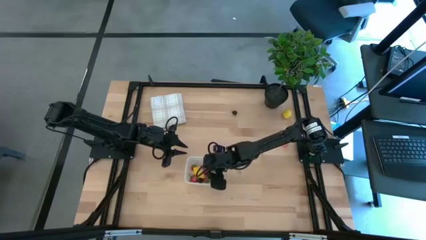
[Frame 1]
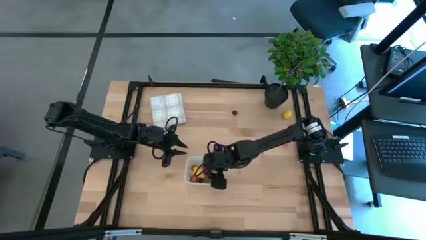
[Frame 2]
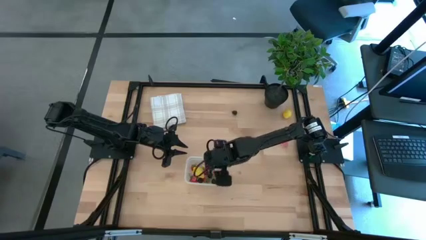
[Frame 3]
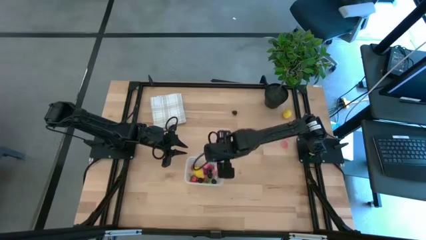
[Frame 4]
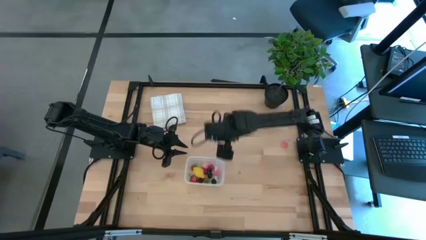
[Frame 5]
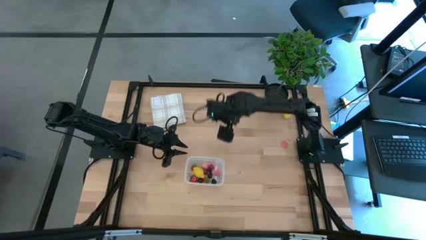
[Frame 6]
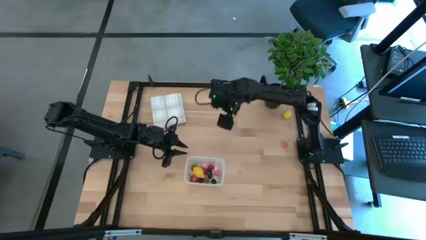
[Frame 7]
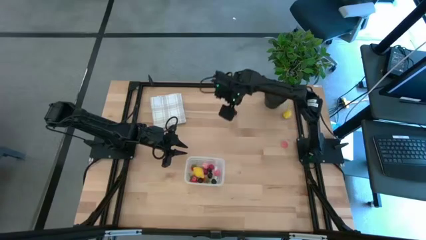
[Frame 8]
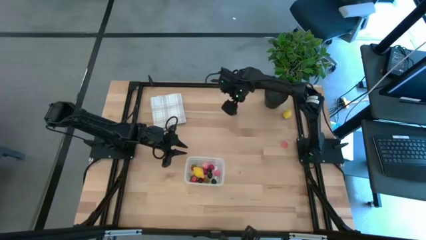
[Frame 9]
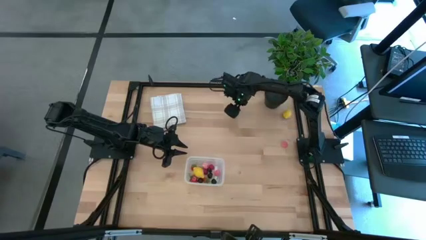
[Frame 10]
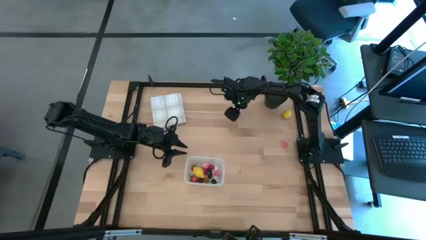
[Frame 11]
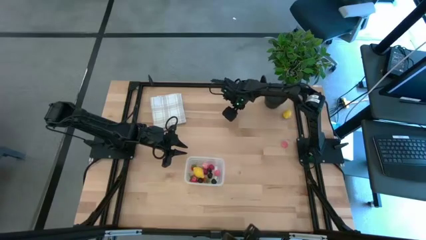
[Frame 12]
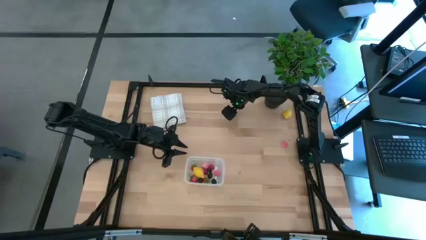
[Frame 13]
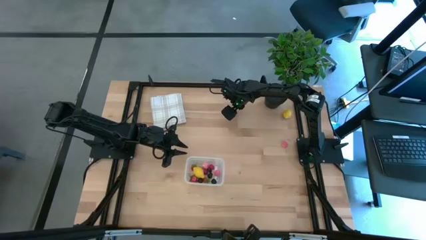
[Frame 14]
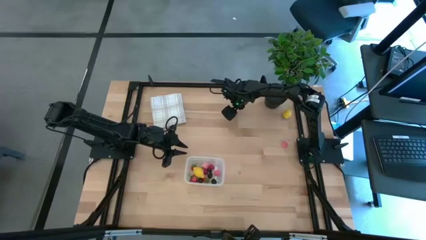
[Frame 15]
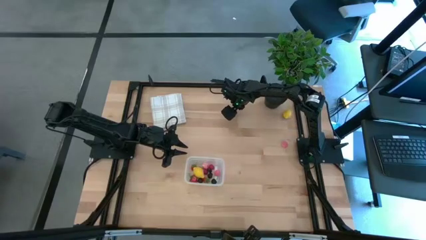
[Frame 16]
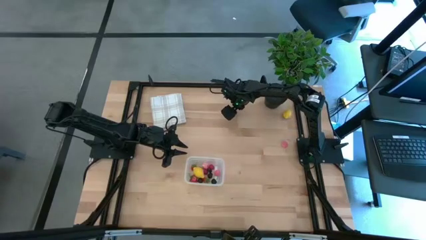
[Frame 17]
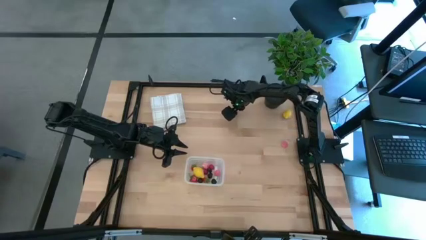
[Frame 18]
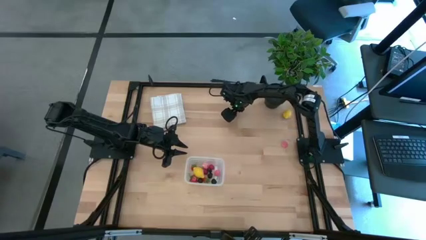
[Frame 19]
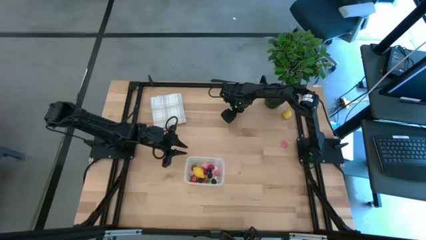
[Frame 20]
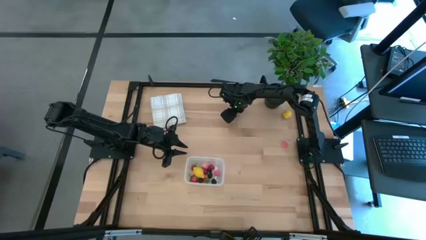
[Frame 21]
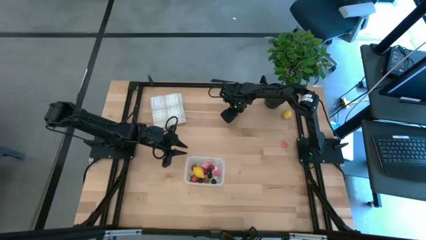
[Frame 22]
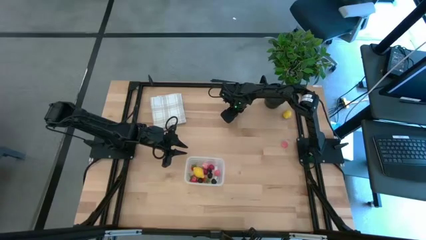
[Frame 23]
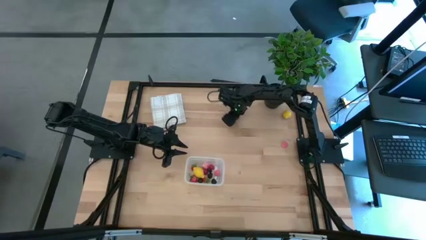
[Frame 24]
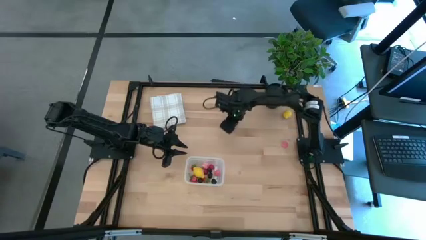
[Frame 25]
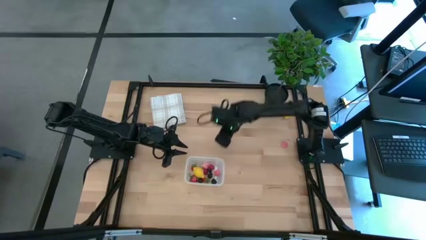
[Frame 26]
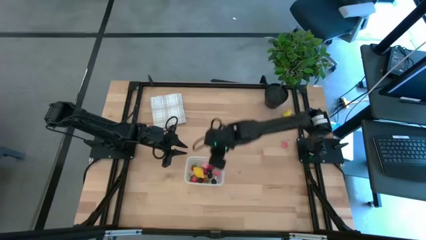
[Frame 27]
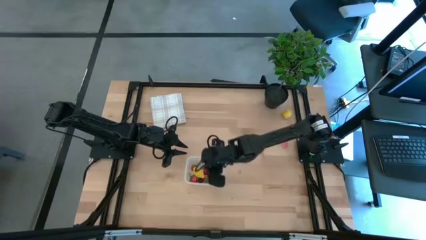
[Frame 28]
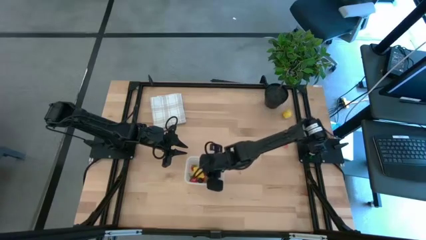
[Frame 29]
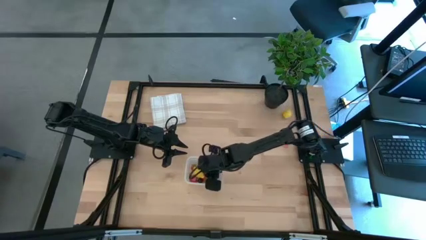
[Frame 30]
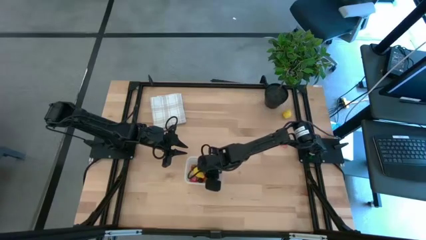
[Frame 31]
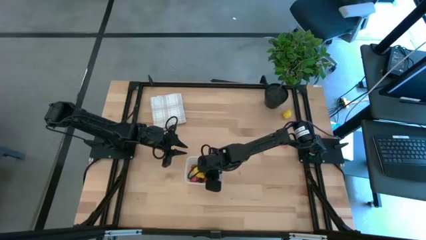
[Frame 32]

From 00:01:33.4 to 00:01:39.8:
Task: Pick and placing Produce into tupperware
Put the blackberry into the transparent bin

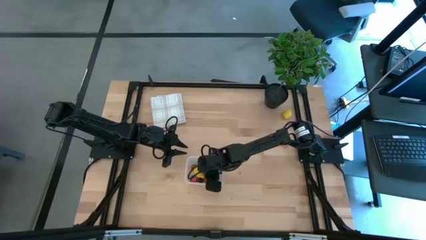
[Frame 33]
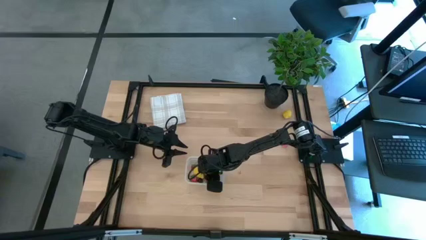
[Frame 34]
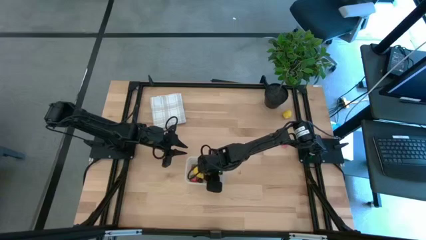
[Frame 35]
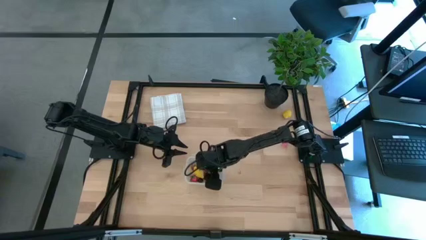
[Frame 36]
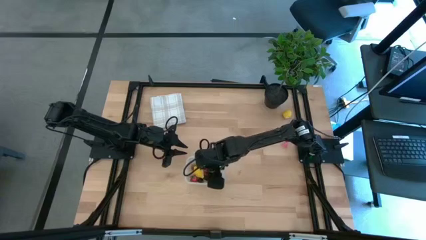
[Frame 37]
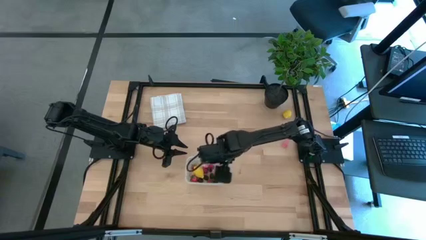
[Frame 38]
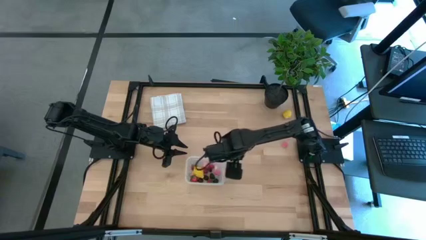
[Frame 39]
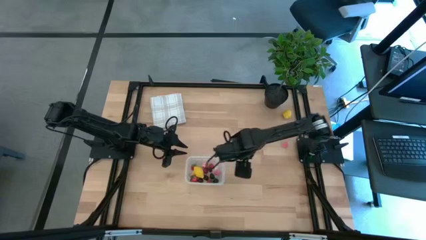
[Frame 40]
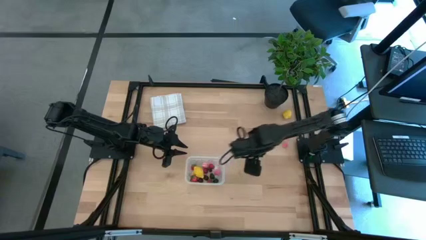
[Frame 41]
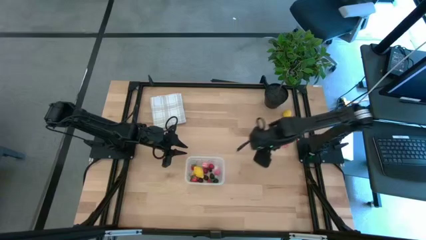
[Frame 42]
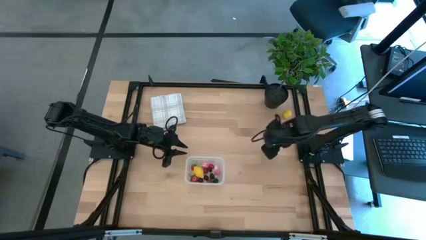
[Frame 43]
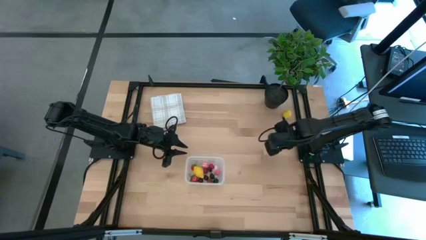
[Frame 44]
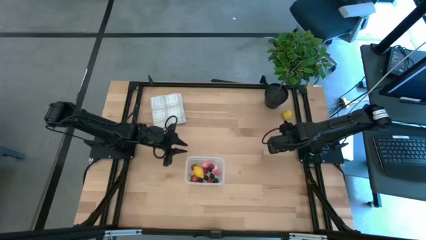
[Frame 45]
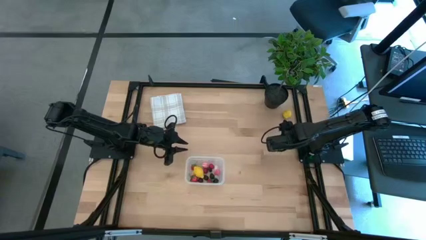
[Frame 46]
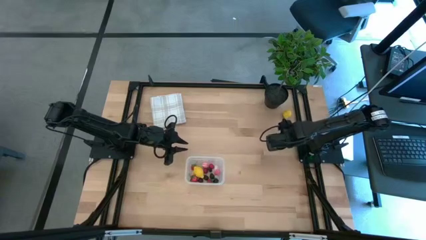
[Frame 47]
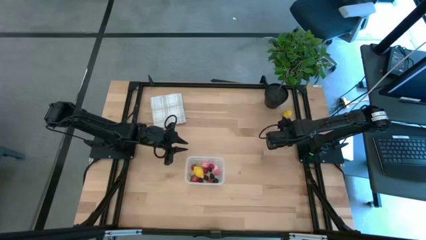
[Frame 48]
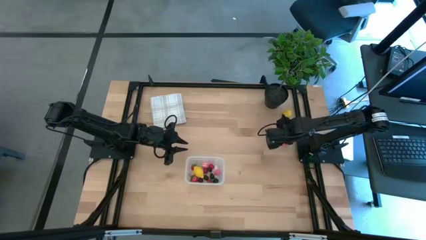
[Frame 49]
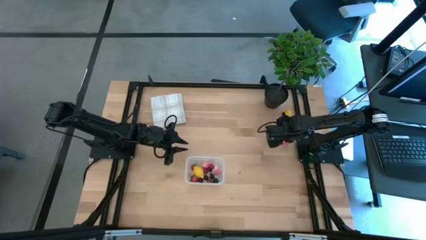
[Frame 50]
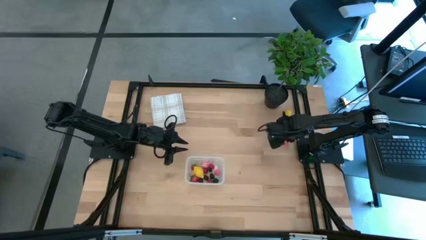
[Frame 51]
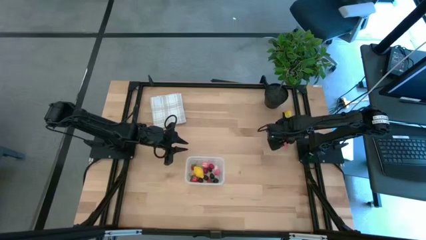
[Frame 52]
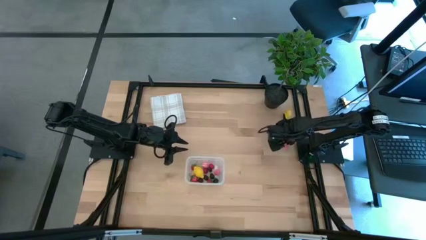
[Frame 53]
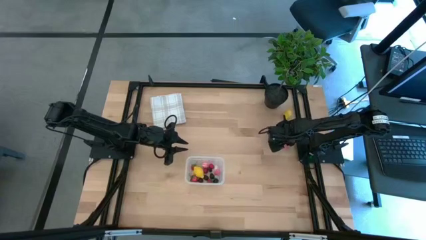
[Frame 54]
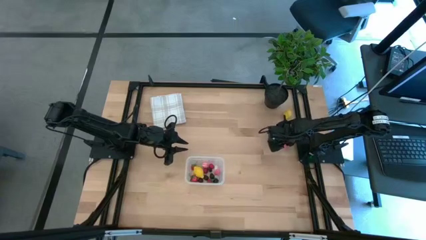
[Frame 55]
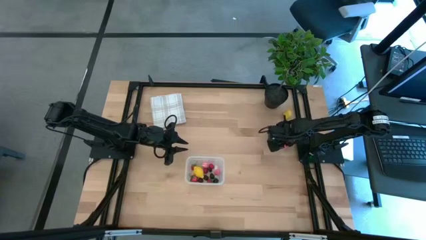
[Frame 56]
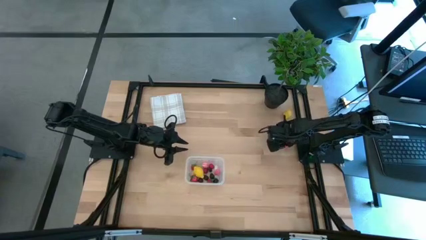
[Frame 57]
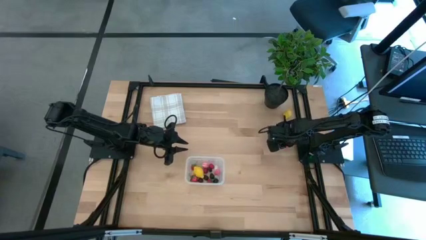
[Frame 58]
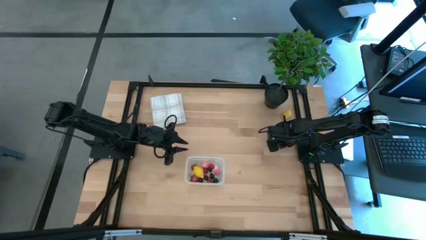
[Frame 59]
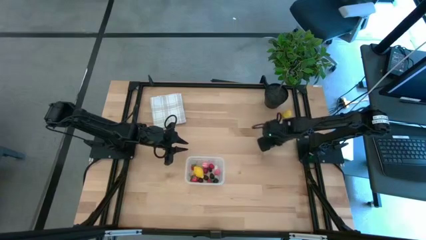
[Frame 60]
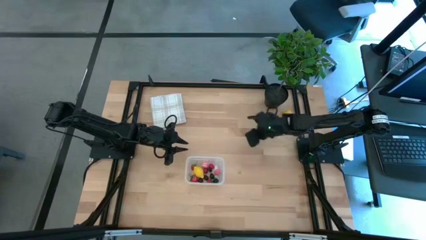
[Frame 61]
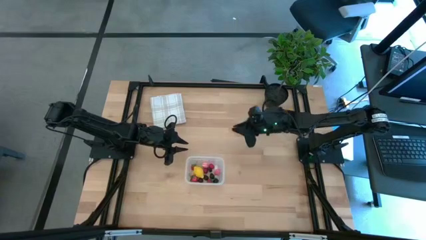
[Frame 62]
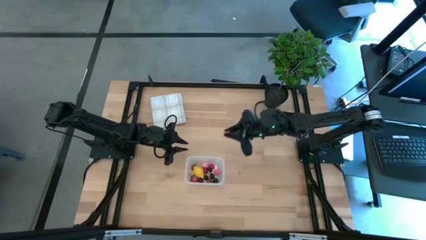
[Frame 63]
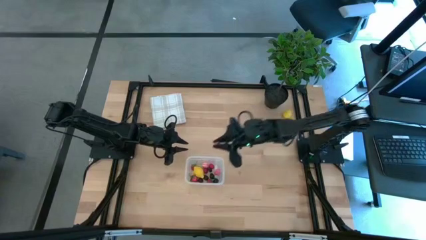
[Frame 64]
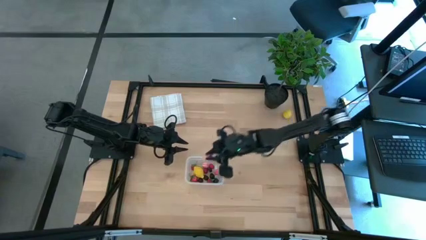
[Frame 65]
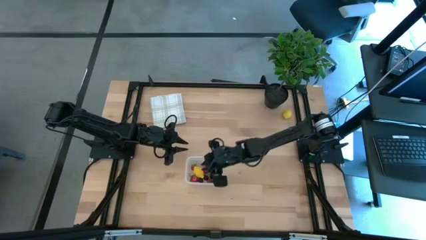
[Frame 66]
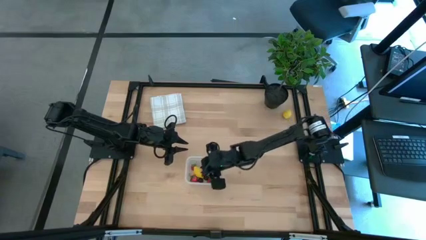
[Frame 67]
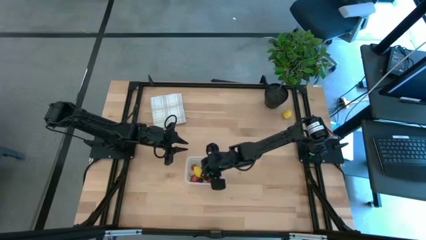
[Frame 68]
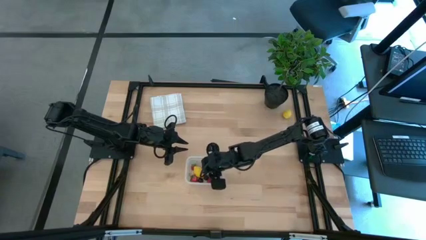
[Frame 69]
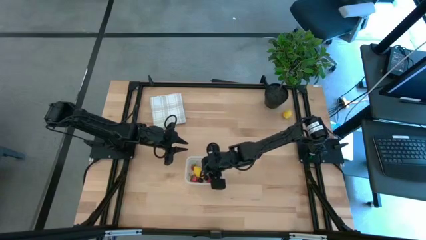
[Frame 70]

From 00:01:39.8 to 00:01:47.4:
Put the peach into the transparent bin

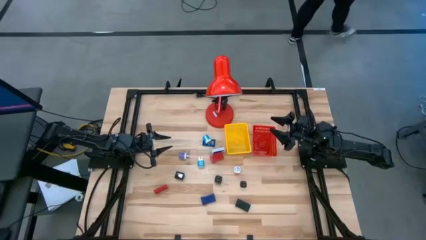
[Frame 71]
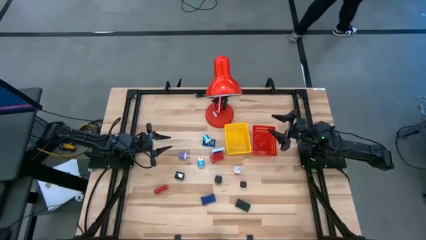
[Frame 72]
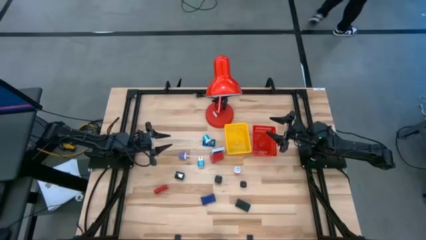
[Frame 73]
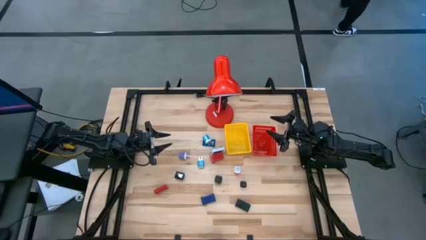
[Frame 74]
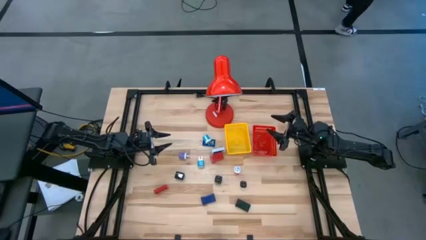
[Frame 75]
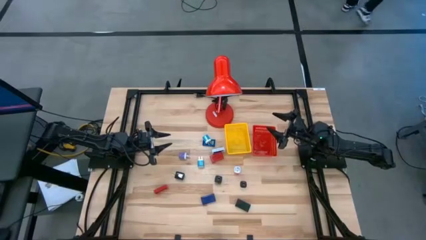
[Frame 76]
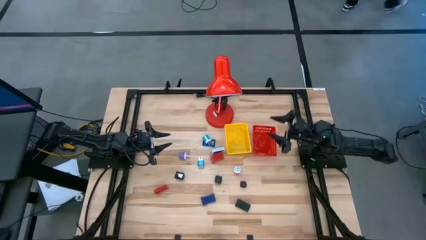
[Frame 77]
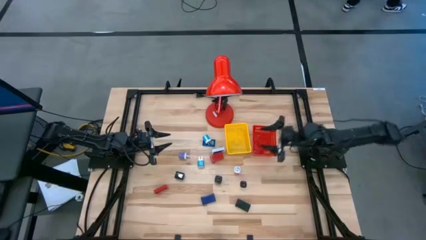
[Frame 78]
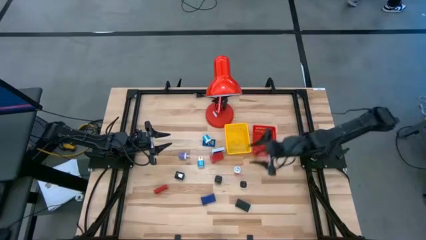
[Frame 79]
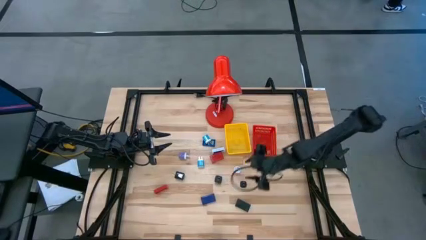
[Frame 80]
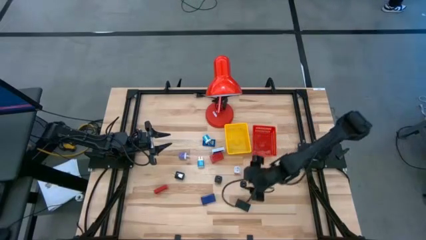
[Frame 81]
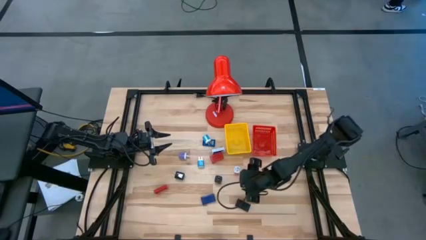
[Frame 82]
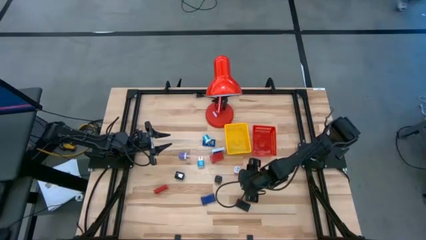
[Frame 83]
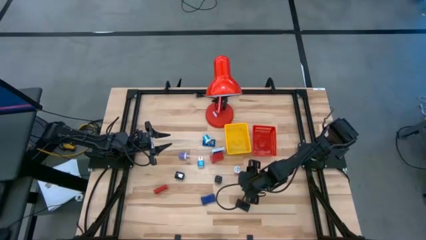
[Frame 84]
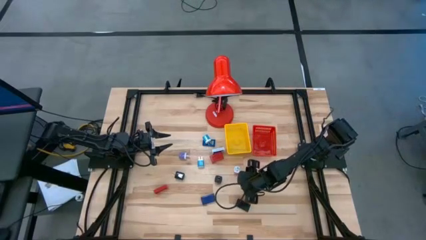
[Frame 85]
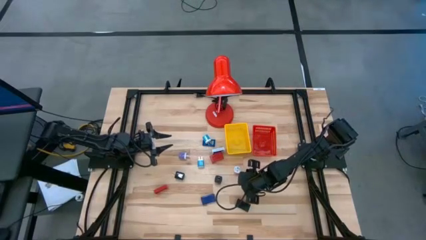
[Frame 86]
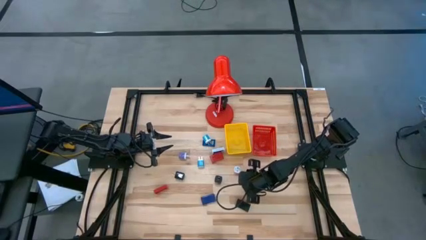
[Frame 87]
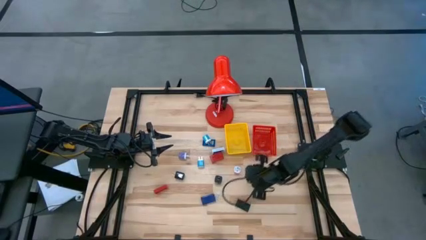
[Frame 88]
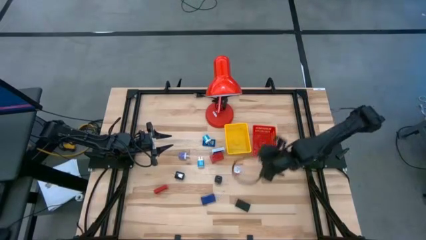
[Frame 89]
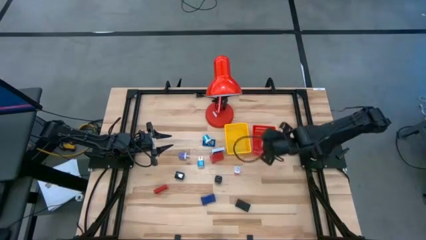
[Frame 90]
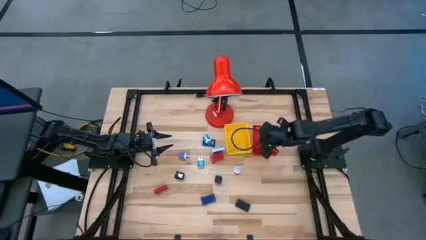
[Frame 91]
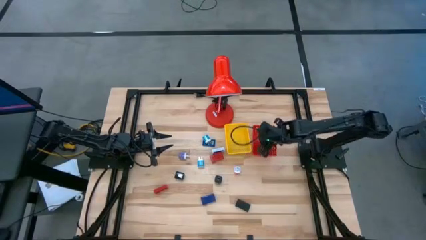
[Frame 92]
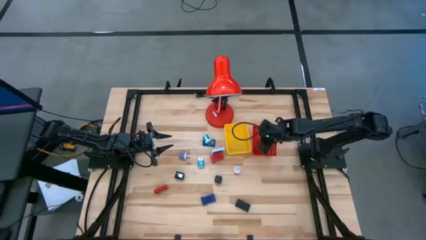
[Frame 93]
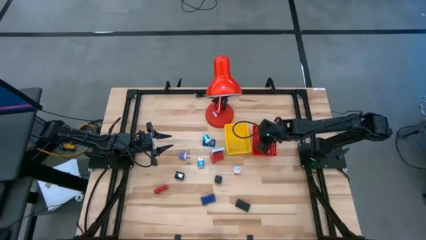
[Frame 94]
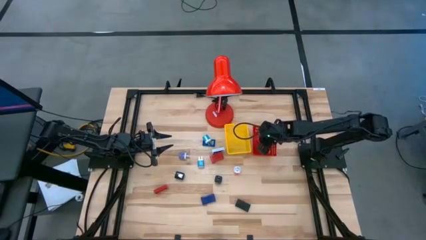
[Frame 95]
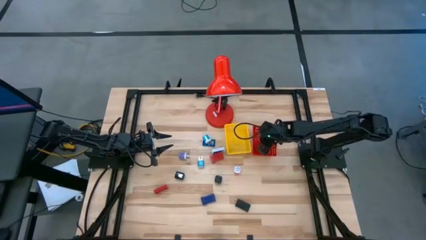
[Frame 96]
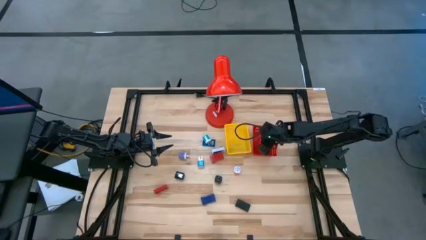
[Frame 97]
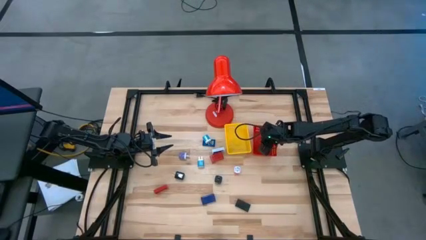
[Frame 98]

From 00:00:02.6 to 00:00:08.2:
Task: Pick & Place Office items
Put the right black charger adapter into the red bin
